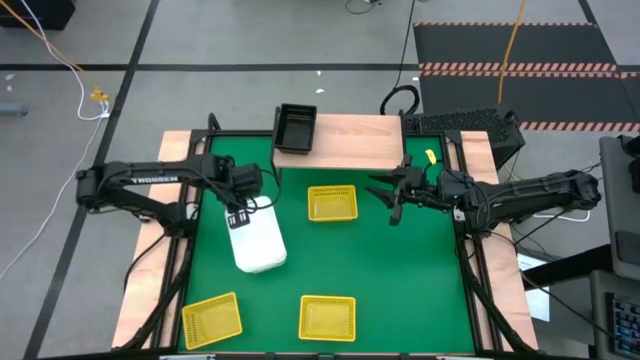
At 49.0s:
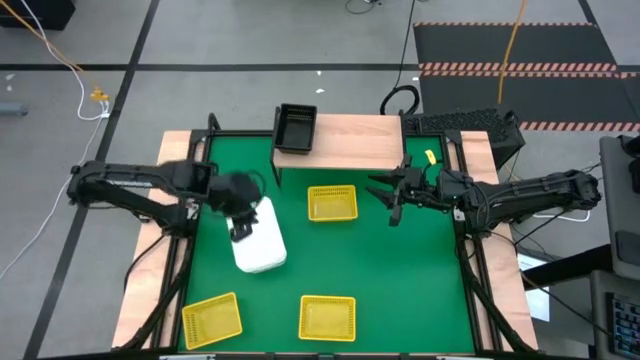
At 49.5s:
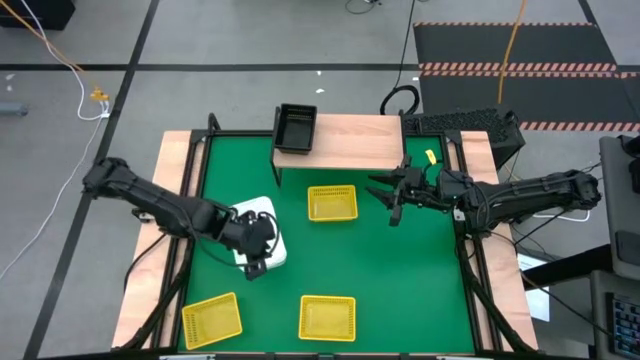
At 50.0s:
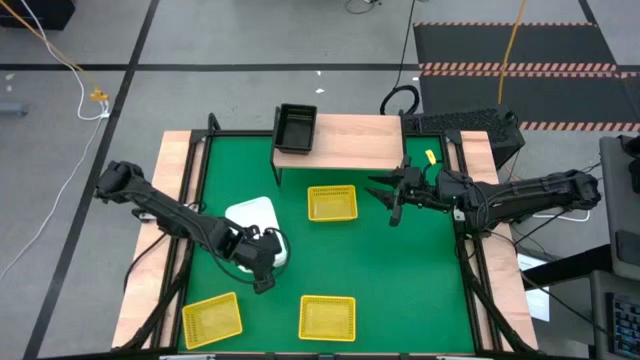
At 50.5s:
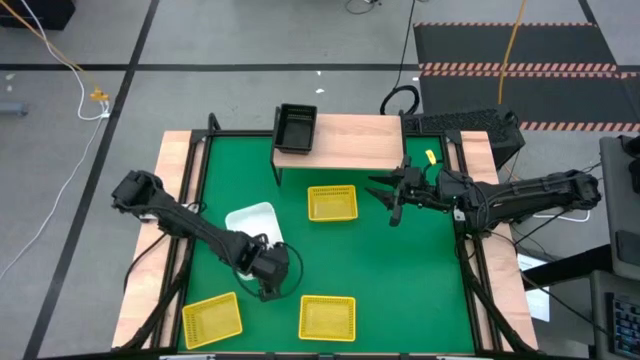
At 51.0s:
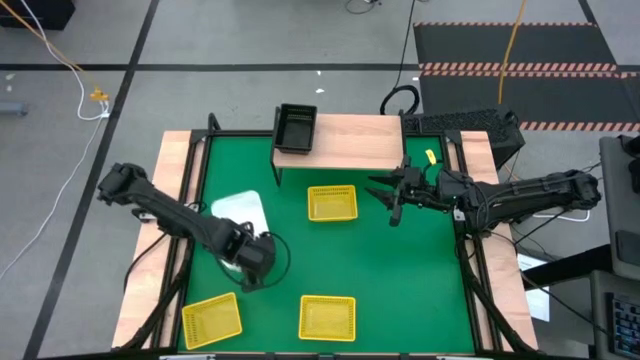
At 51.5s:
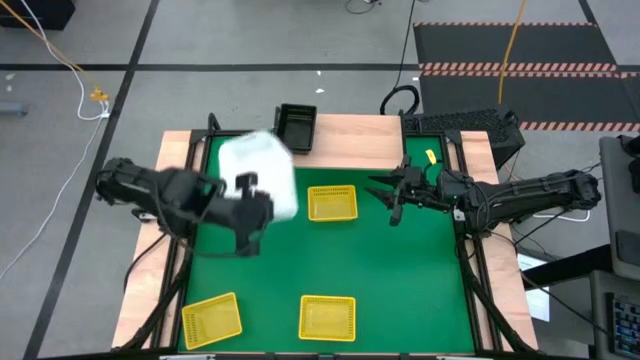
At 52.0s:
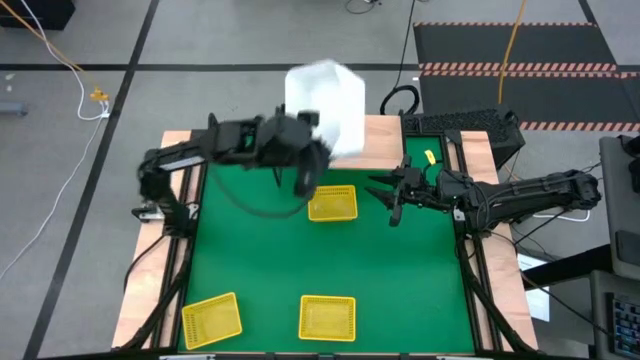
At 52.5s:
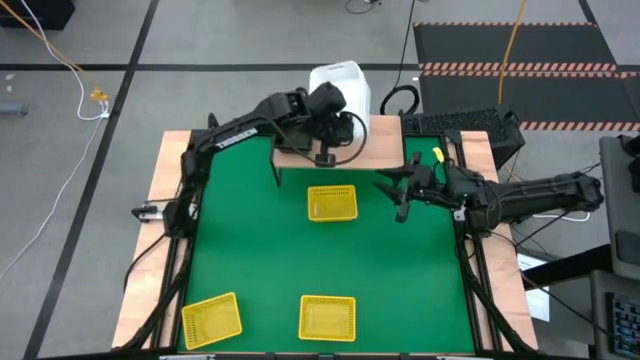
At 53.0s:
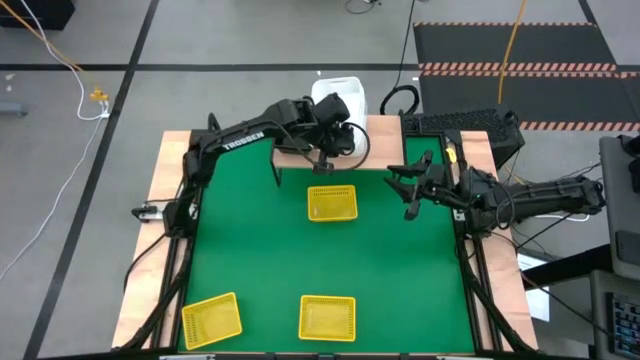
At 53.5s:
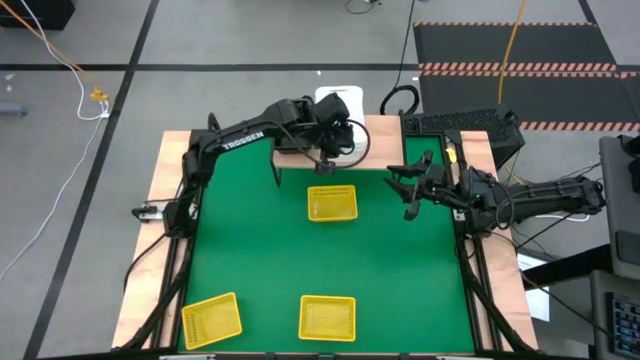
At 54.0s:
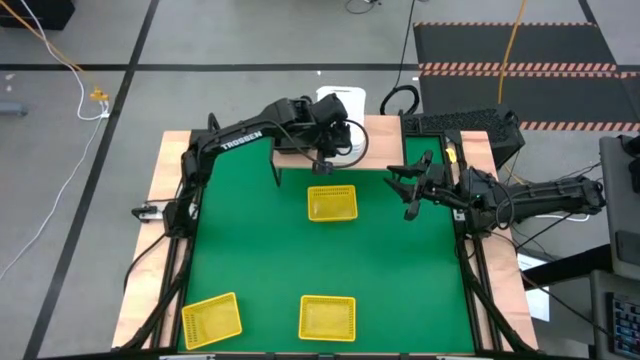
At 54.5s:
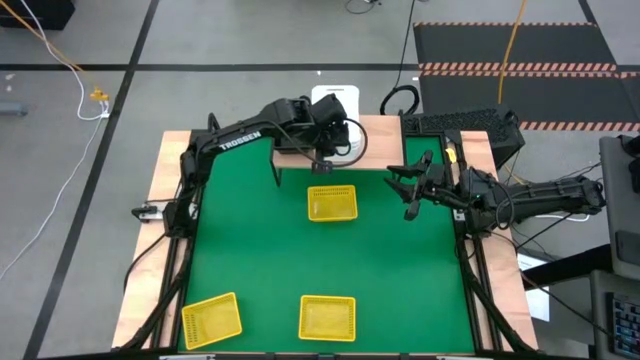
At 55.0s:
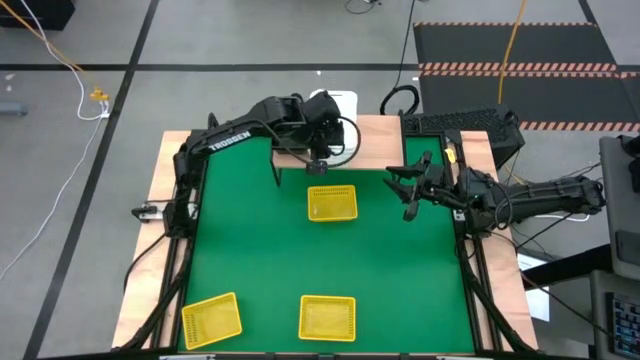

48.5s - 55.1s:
Task: Stack baskets on shelf by color
Put the stacked white bins on the shelf

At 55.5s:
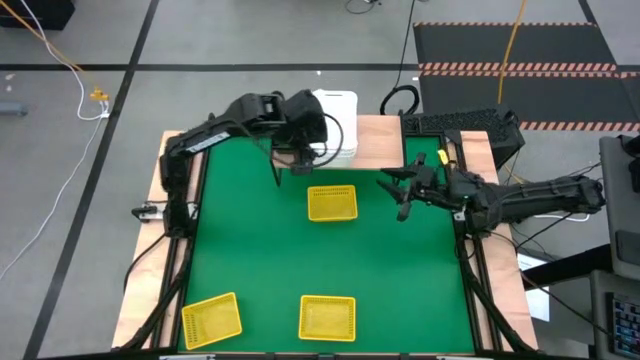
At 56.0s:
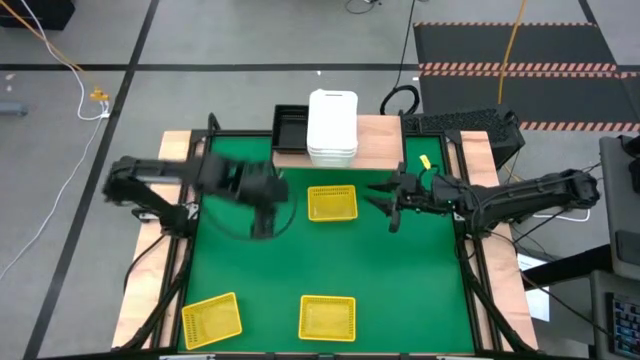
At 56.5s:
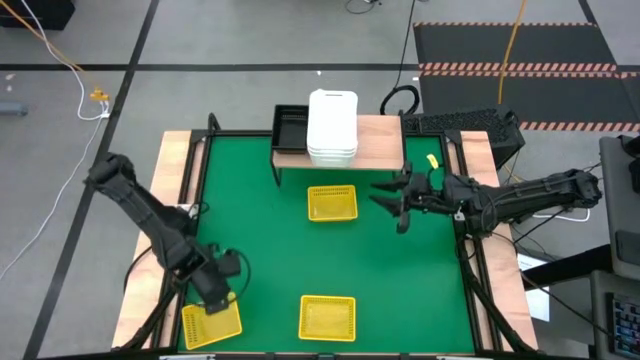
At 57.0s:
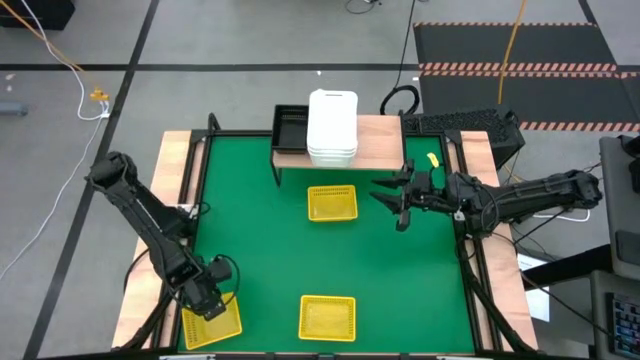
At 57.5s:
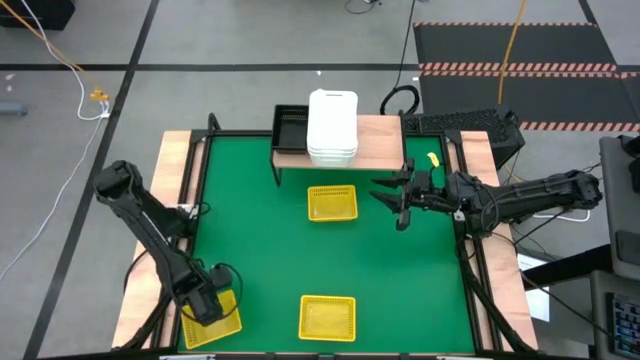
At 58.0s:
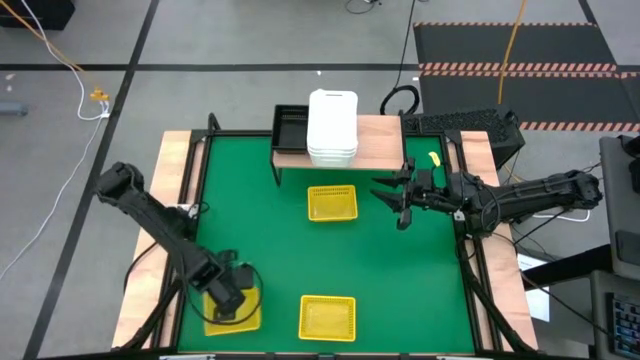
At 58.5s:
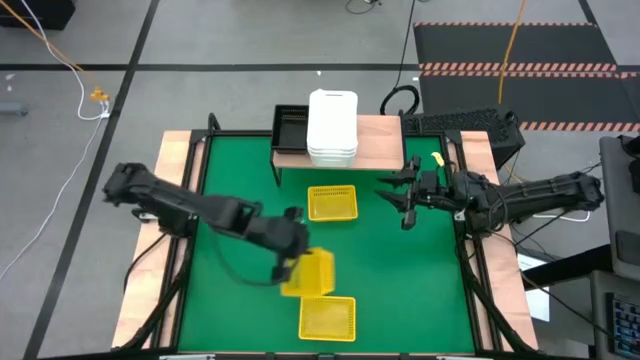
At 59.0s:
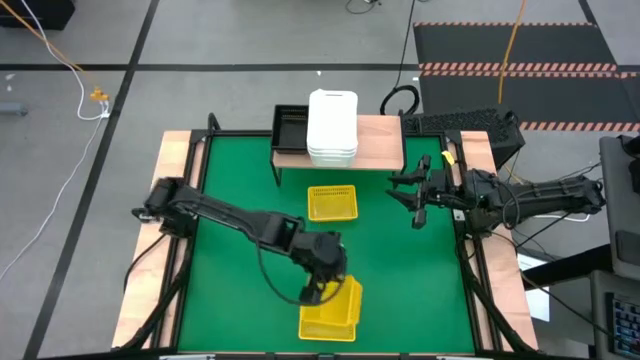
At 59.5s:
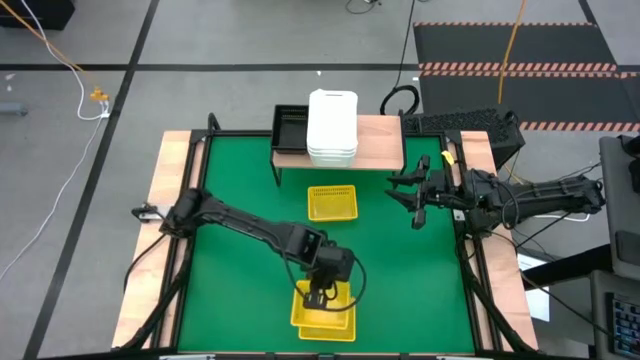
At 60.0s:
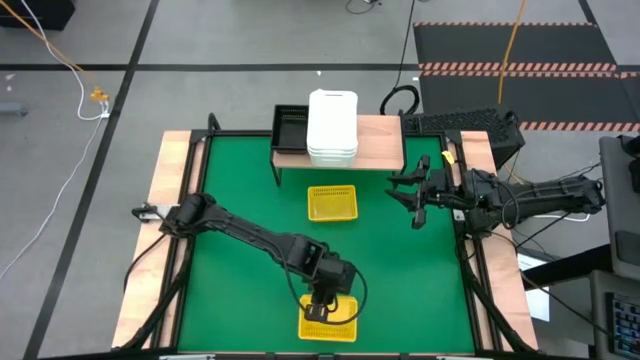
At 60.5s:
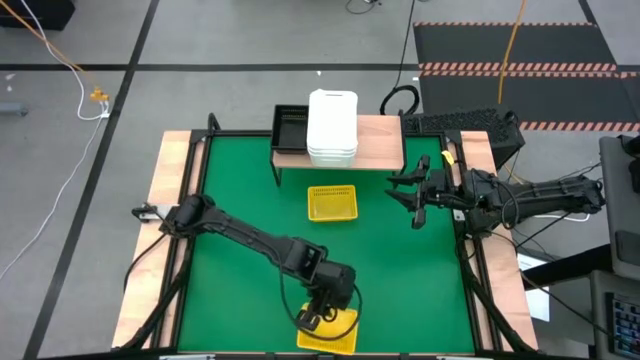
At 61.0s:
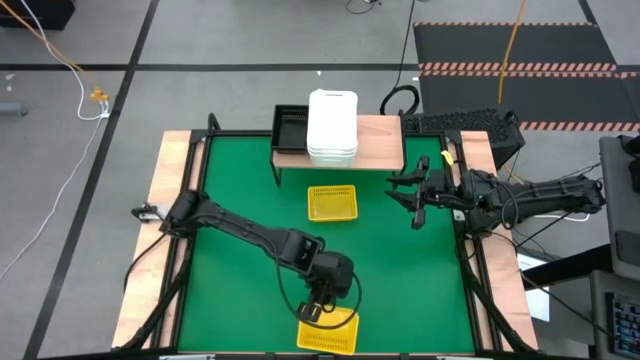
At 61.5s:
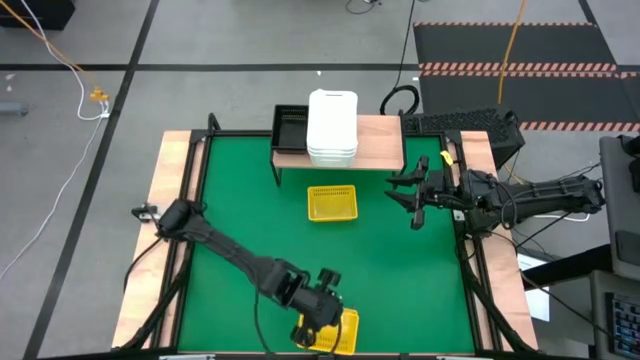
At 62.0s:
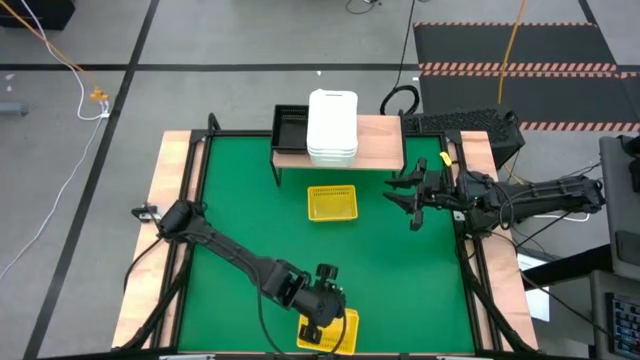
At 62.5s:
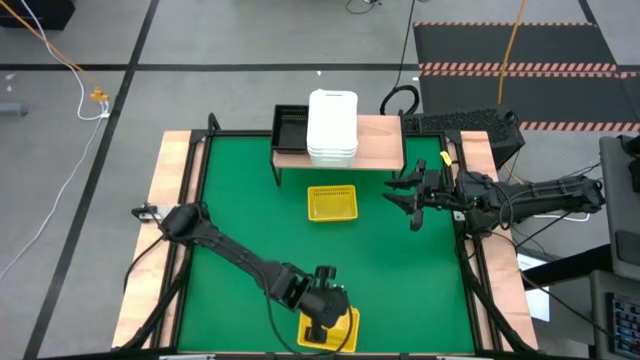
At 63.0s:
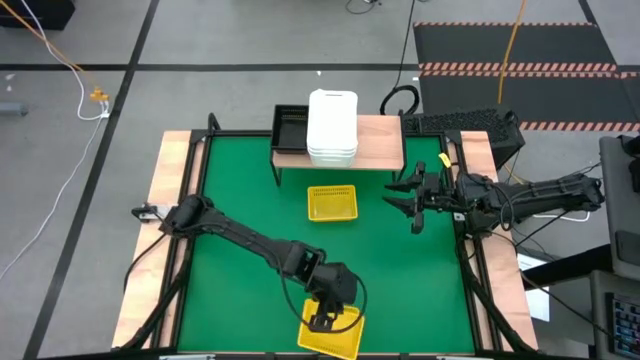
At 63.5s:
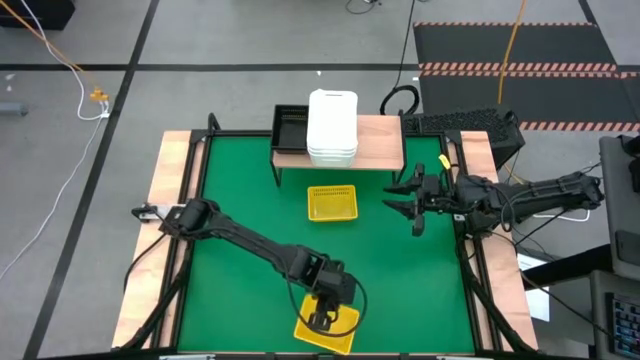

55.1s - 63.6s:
Stack the bottom left yellow bin on top of the bottom right yellow bin

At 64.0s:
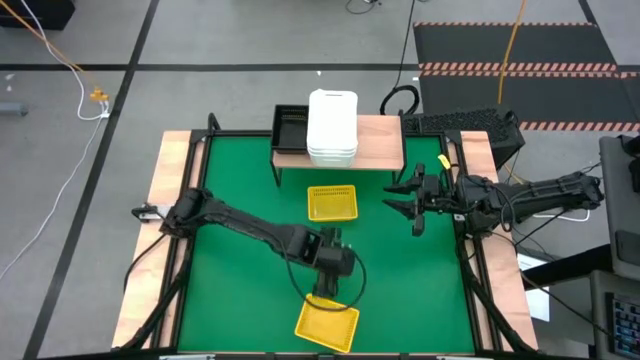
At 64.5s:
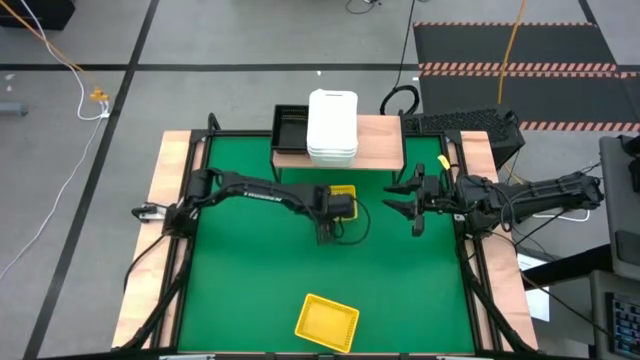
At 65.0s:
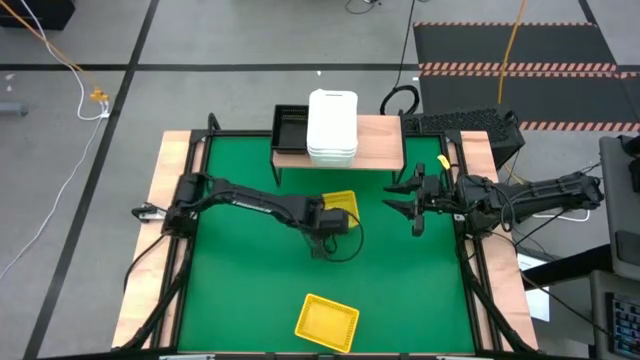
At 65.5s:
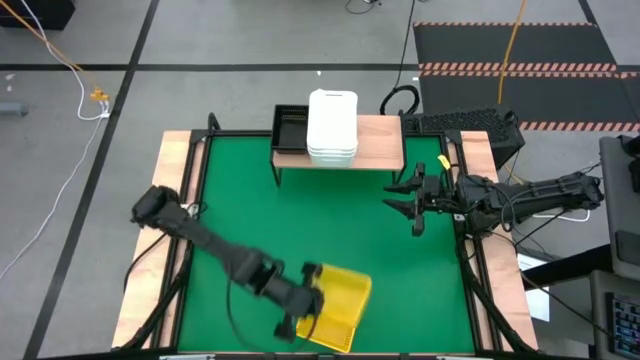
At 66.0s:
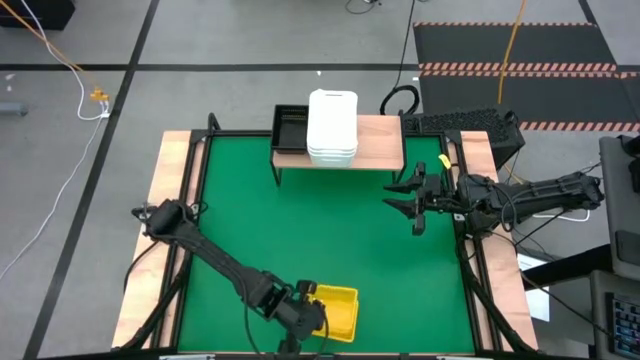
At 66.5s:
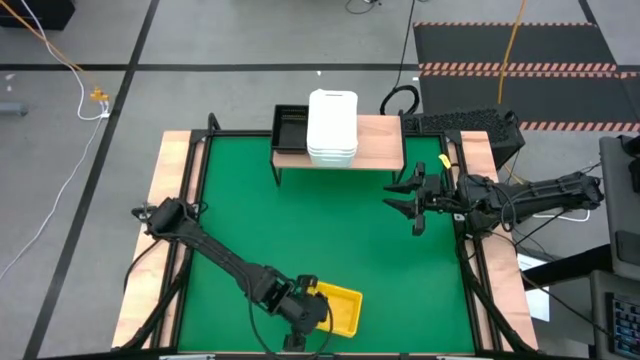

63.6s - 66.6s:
Stack the top yellow bin on top of the bottom yellow bin

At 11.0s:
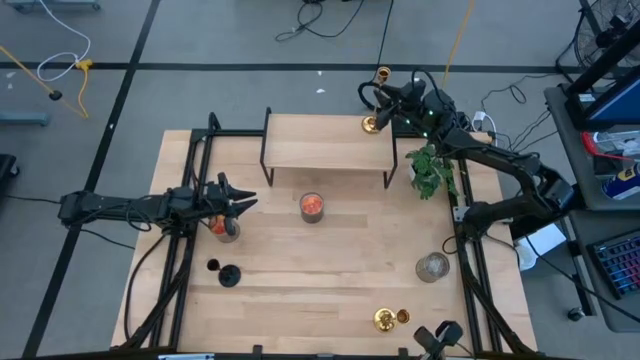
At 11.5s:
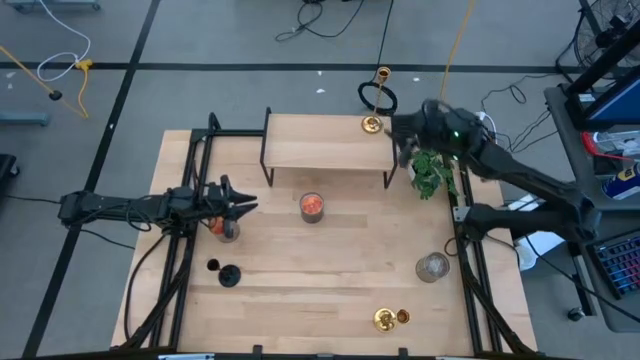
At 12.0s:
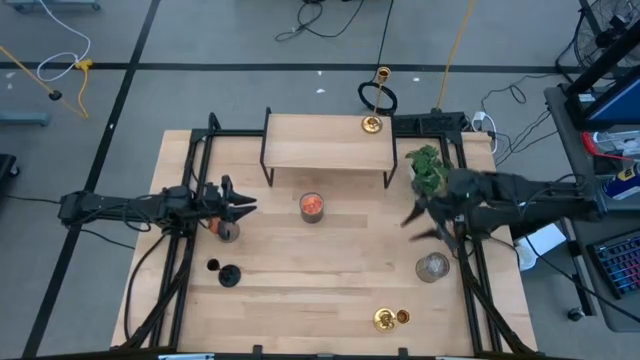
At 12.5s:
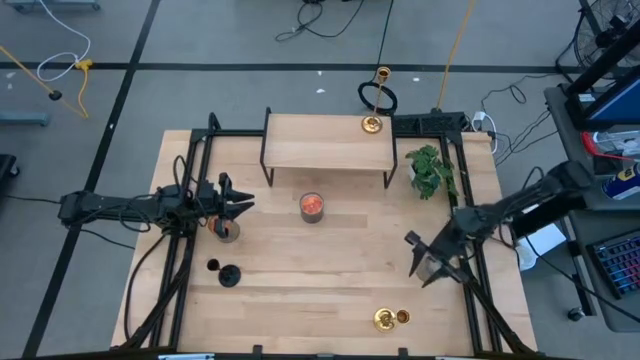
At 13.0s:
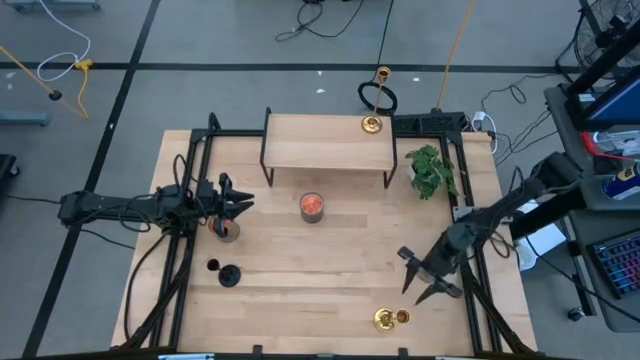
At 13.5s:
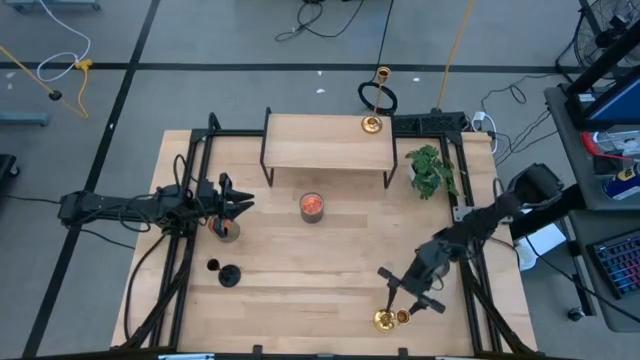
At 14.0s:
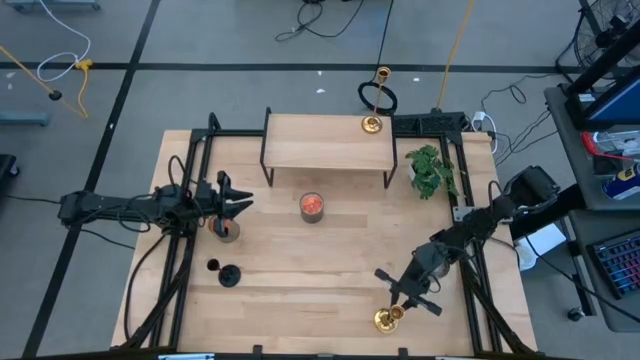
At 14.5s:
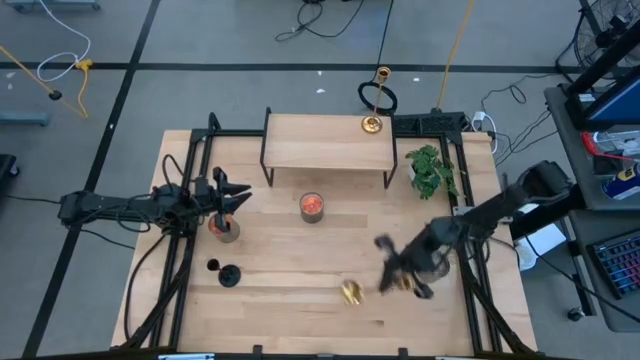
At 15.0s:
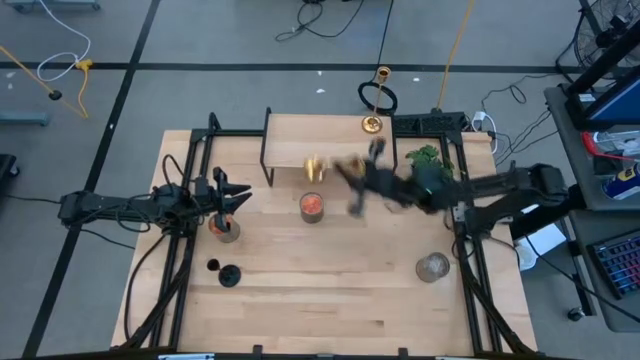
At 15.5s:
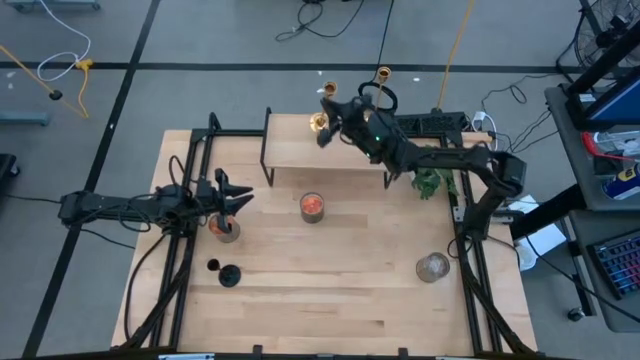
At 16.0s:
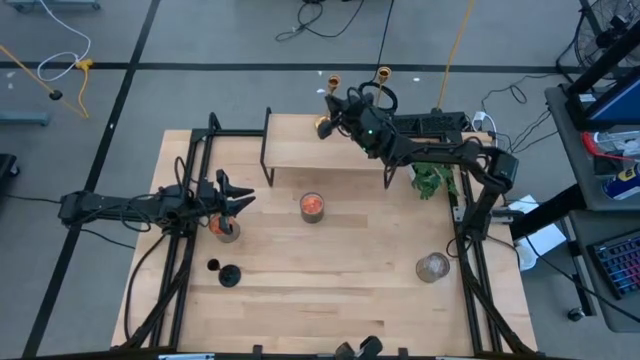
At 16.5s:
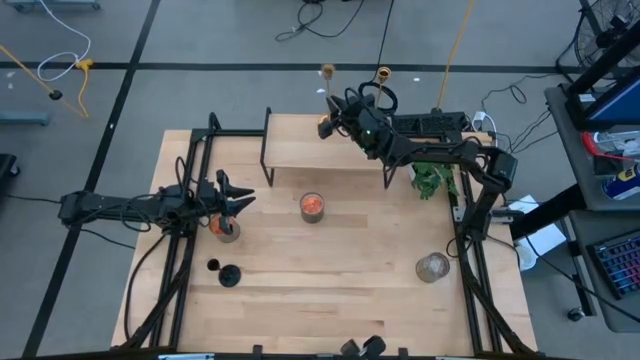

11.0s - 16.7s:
Task: Pick & Place candle stick holders
Put the gold candle holder on the shelf
